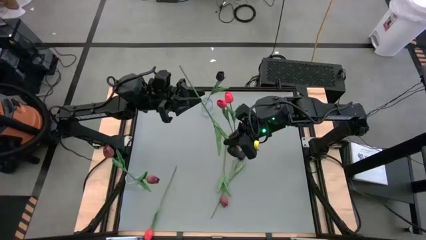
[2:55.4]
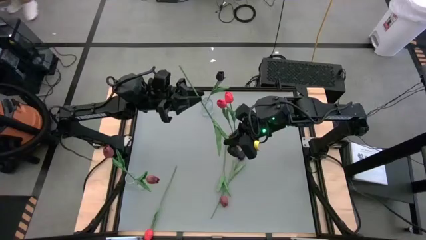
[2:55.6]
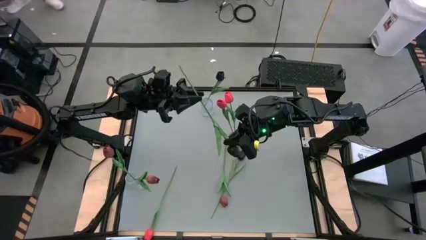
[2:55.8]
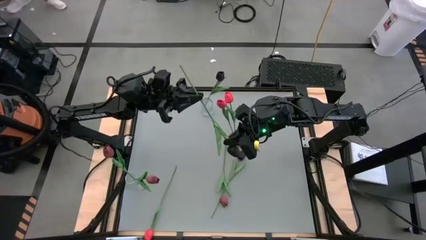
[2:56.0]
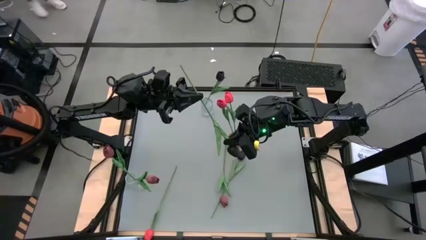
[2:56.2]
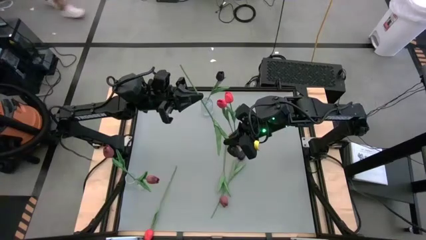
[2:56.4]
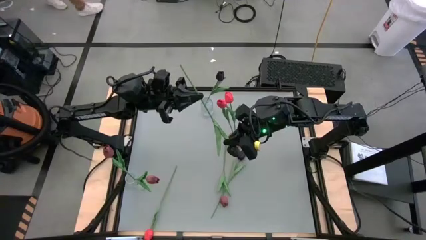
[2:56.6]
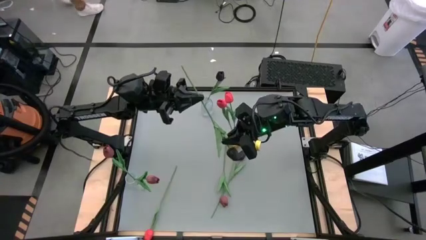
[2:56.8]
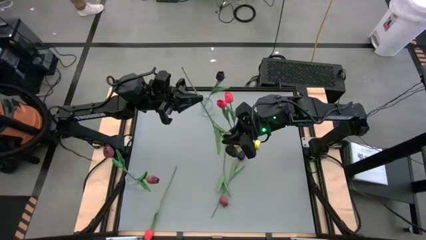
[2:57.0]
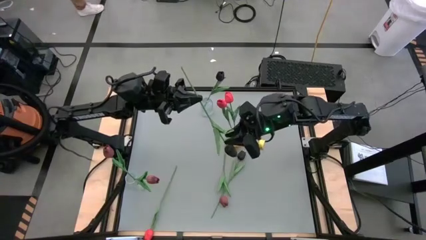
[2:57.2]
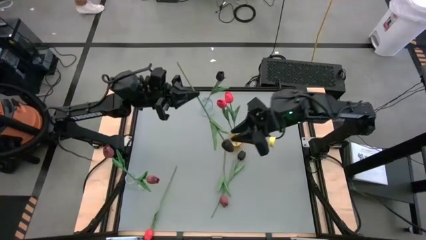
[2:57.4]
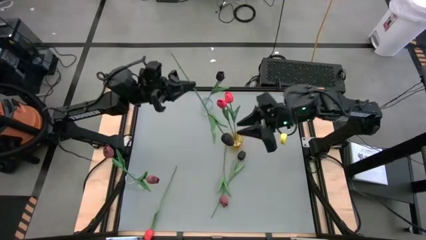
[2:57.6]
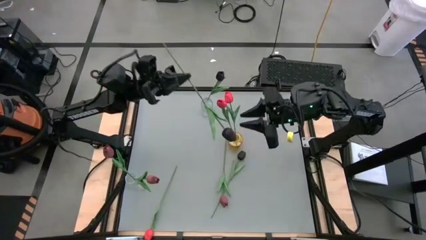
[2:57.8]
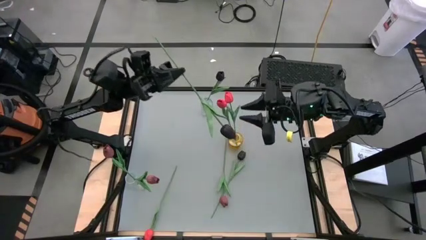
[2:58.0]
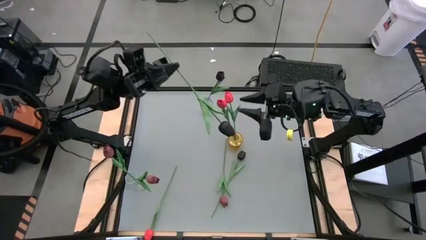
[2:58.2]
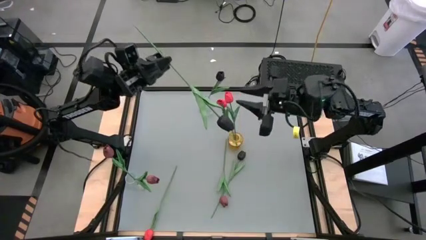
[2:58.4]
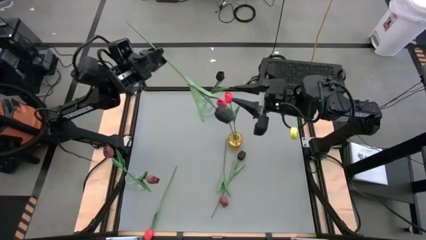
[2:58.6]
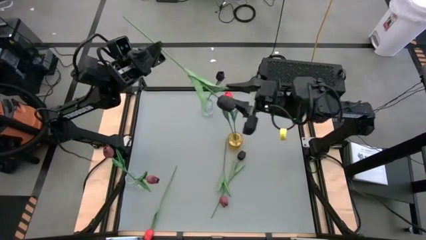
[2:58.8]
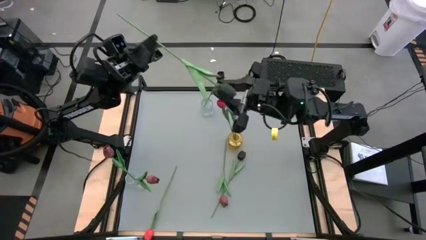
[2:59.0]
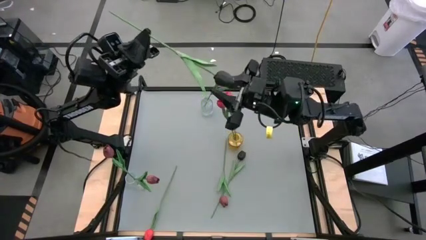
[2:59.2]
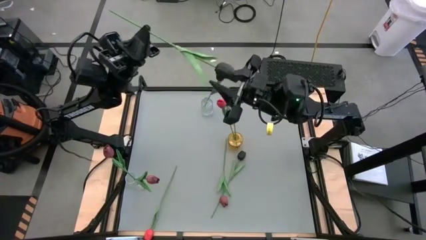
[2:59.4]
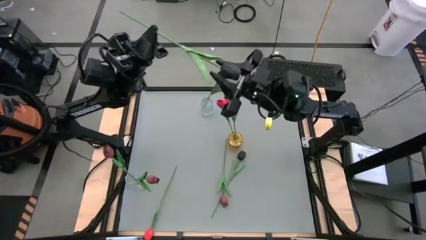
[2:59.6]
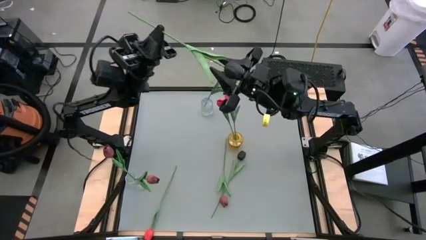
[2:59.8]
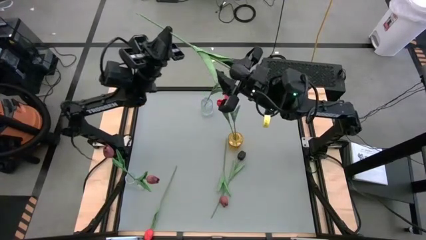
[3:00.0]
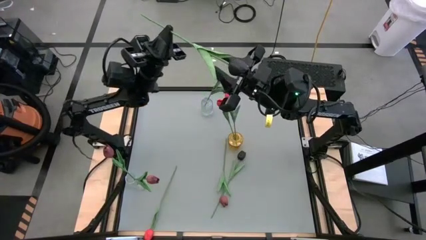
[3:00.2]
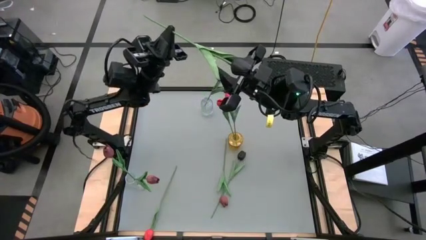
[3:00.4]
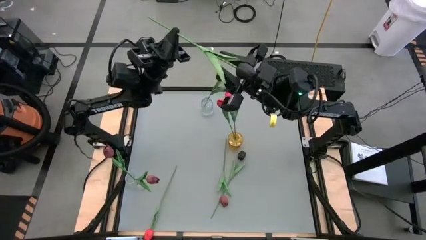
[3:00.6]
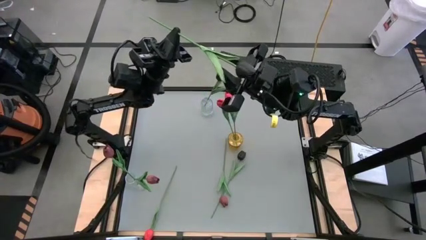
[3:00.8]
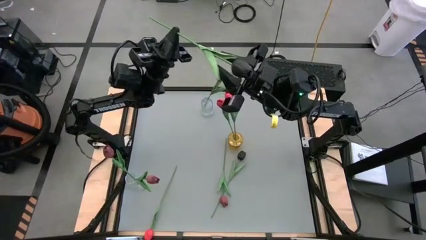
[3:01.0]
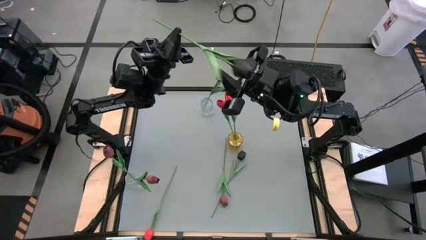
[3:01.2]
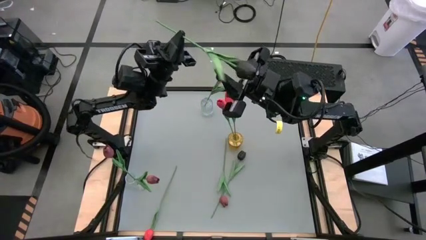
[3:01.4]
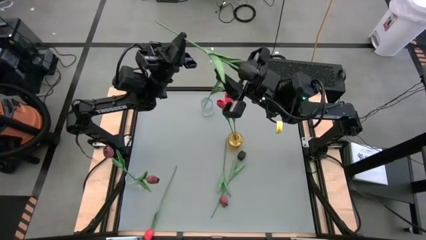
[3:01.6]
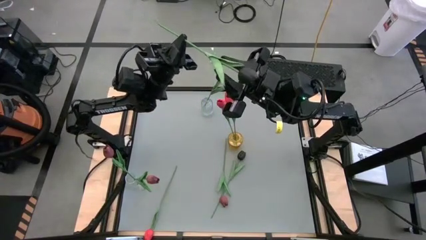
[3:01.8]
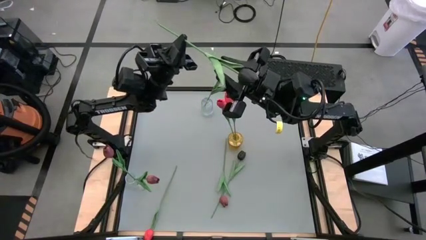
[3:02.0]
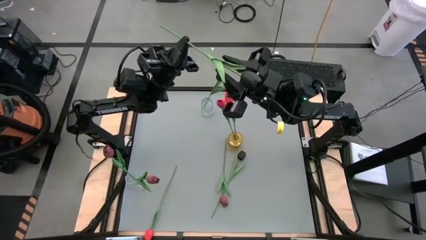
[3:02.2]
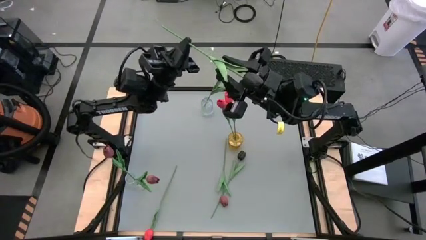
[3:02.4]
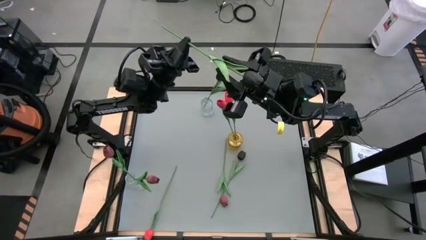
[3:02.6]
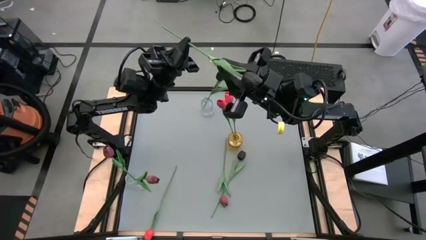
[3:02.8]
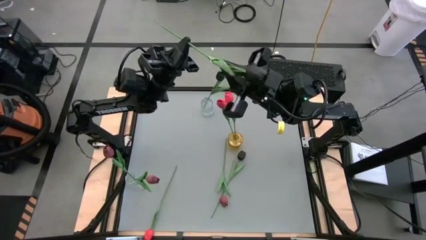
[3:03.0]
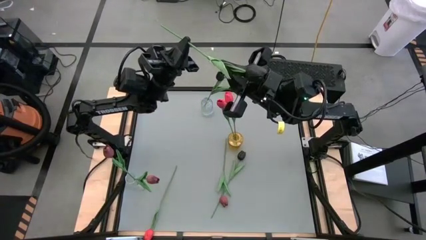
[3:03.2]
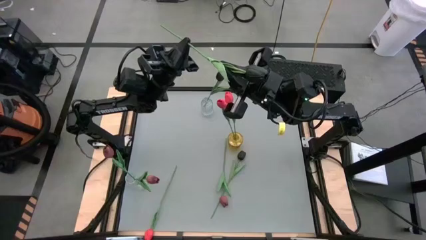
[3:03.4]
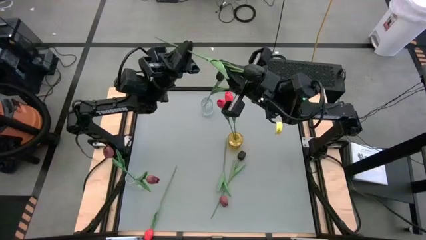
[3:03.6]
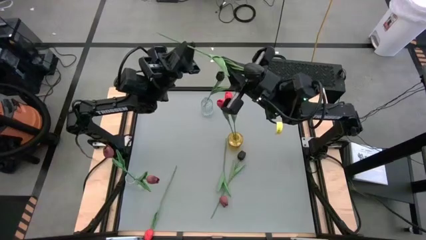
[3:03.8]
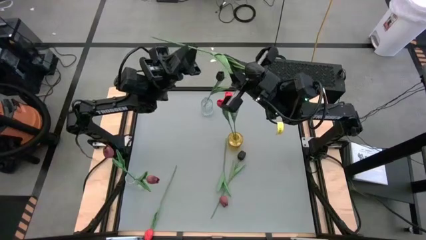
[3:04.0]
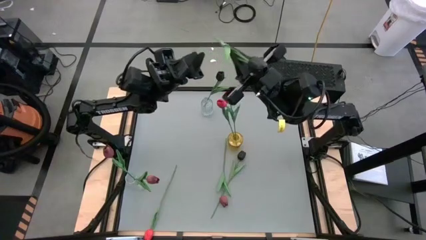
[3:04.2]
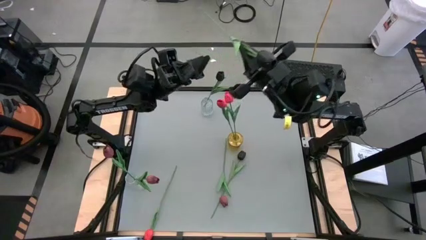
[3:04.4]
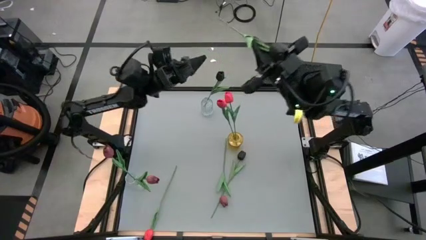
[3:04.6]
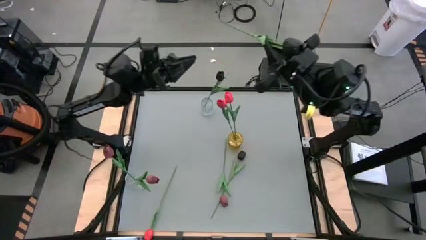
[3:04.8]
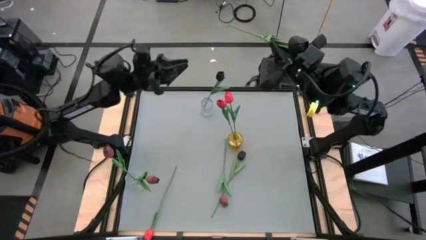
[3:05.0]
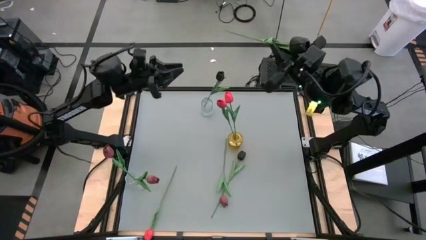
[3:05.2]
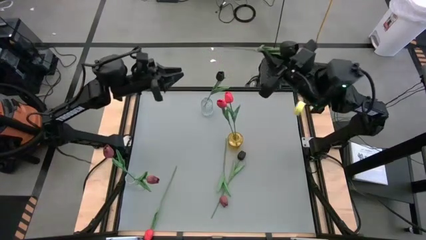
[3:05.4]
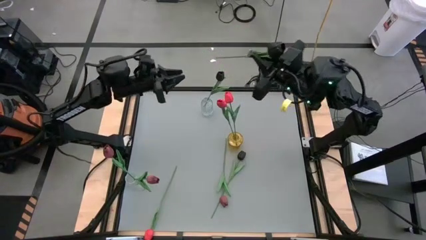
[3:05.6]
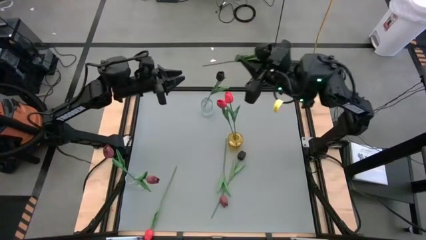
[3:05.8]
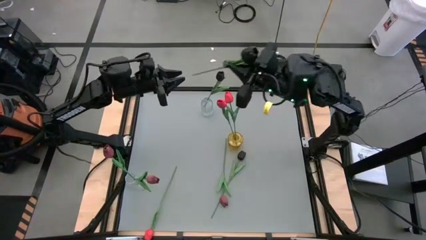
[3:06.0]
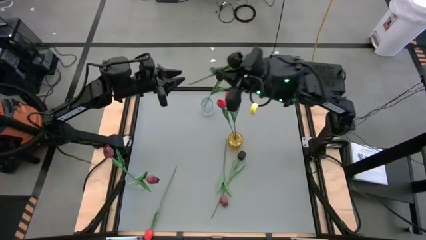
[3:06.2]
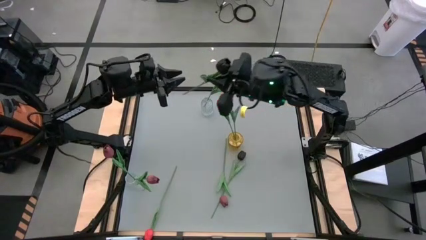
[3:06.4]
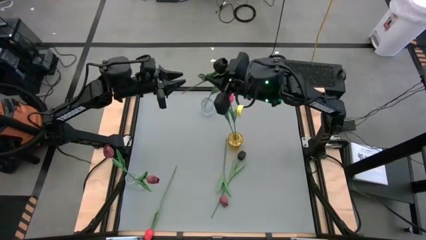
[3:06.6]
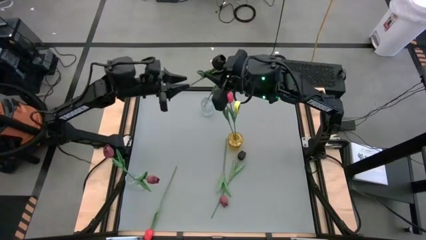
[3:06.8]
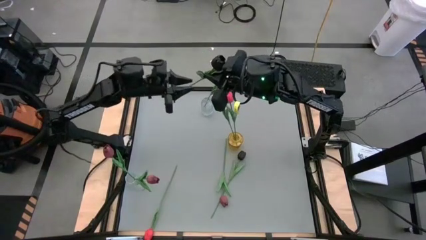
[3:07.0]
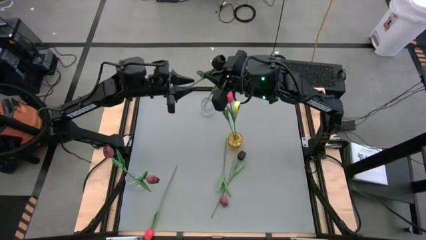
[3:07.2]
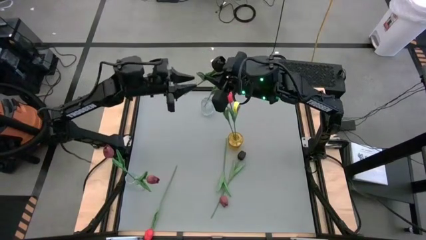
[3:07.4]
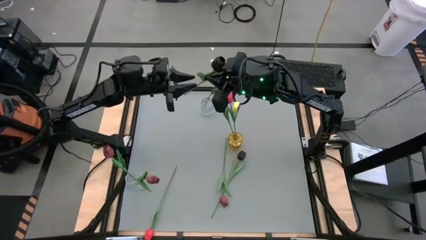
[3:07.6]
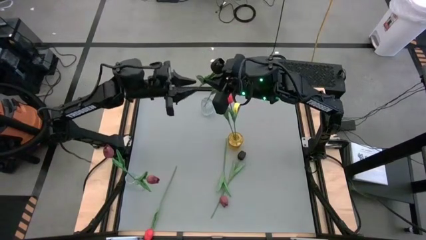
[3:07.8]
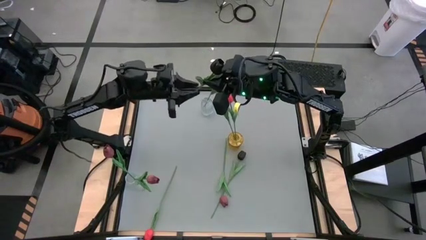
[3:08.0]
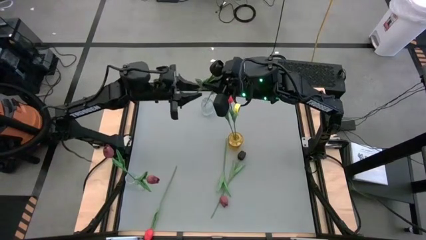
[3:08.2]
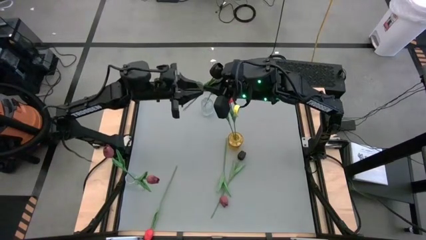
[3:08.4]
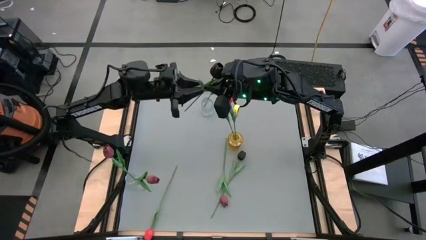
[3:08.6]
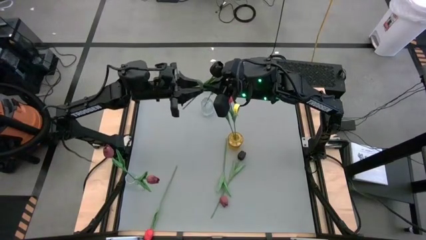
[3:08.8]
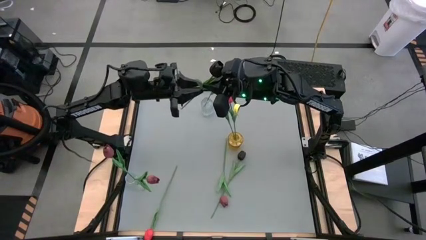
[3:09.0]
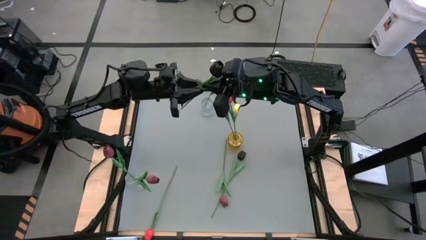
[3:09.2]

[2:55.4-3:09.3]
Task: Sort flowers into vase by color
Put the right black tulip into the top transparent vase

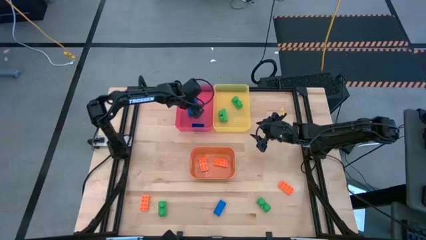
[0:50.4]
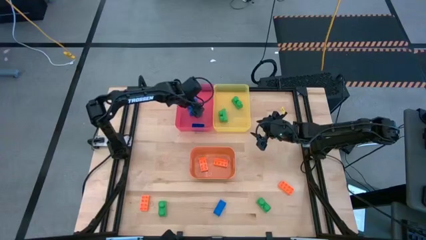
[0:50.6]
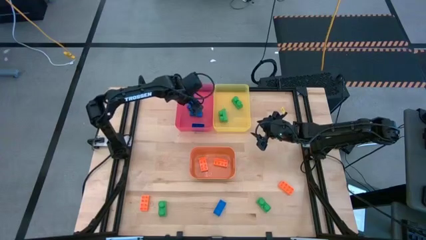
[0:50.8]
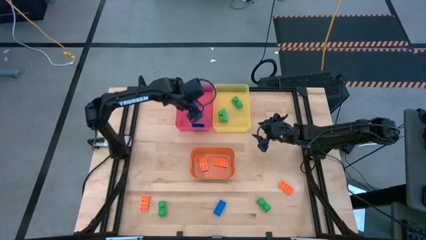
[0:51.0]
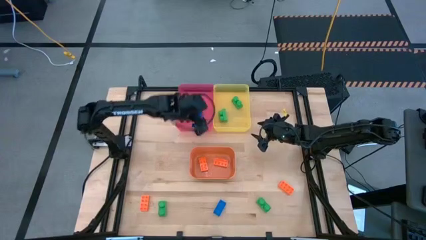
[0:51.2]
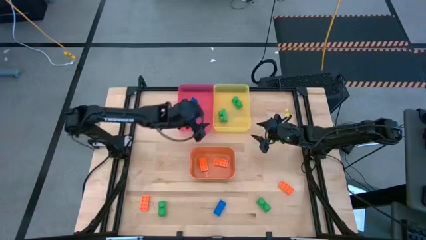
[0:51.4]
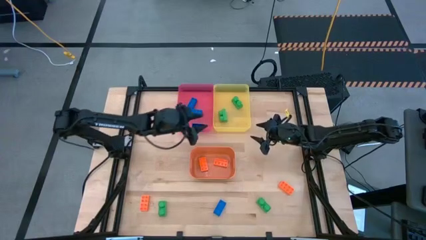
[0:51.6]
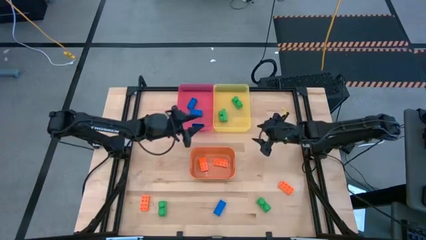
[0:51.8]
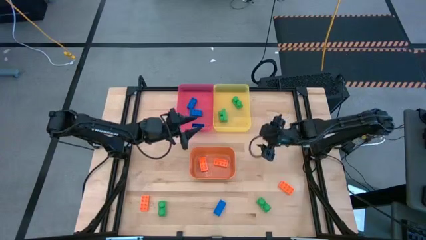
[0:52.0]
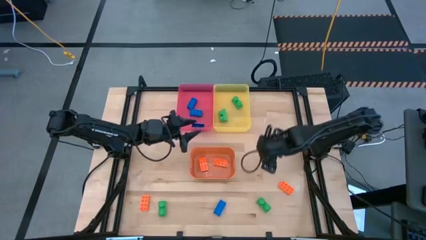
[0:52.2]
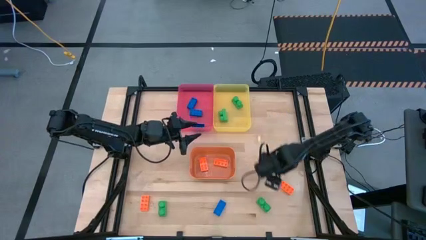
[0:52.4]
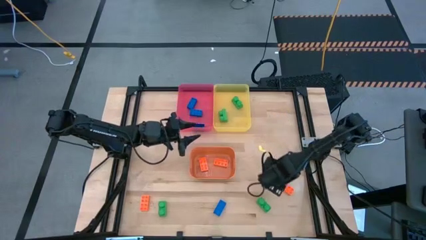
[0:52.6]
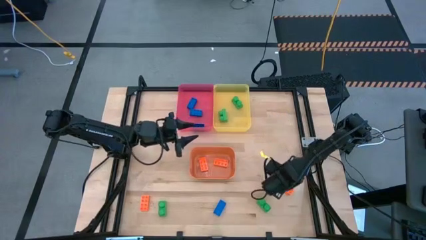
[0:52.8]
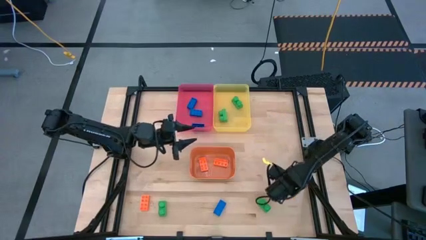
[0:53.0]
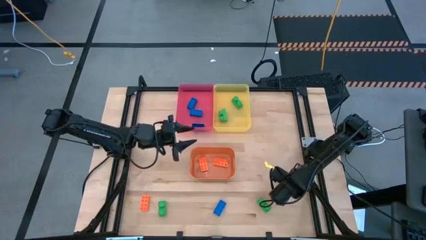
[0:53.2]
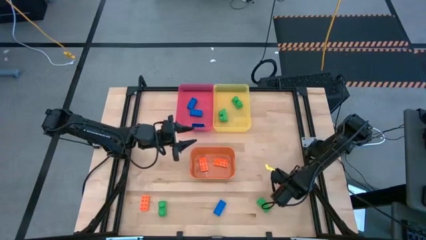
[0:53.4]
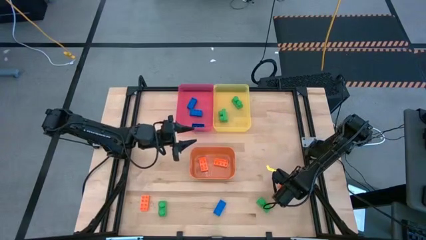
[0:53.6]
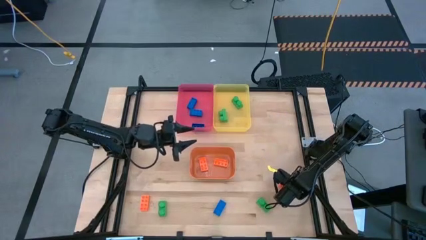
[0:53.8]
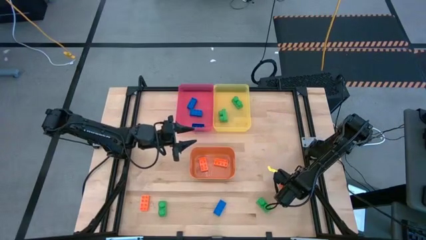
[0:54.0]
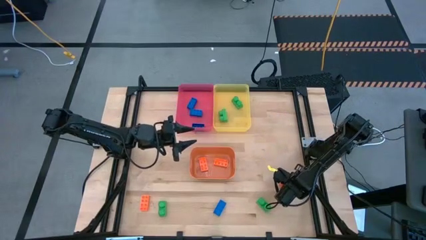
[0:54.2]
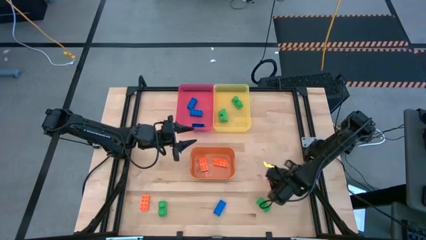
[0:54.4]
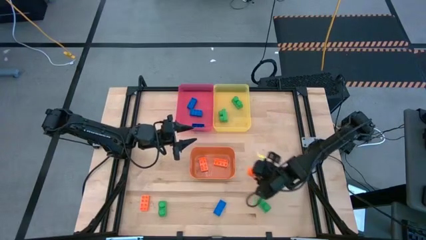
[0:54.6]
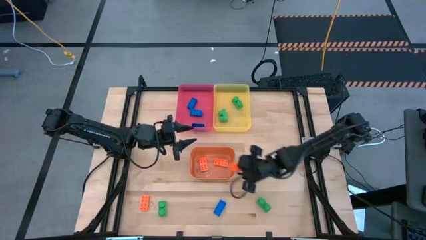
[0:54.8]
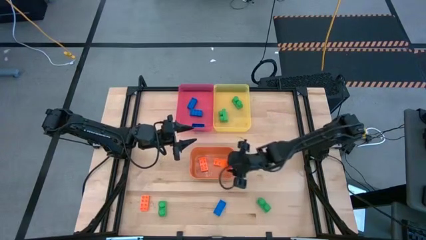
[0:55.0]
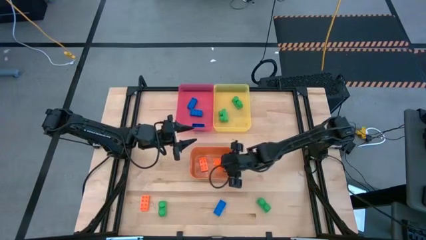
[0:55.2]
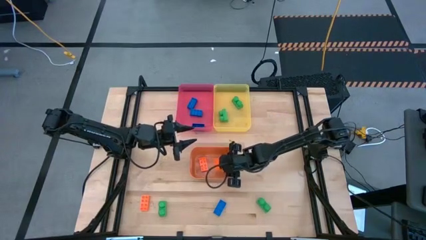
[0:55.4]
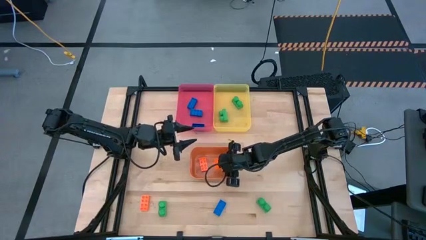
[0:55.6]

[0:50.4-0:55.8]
Task: Sort & place blocks by color
Put the orange game piece into the orange bin
